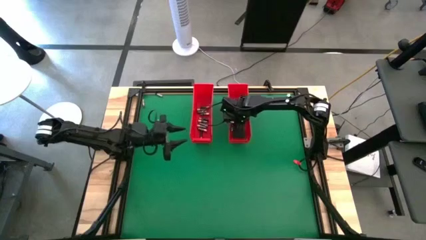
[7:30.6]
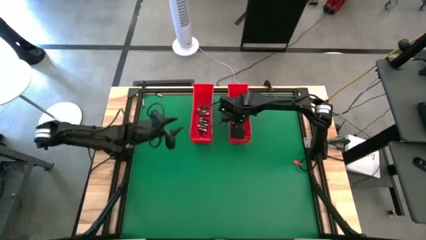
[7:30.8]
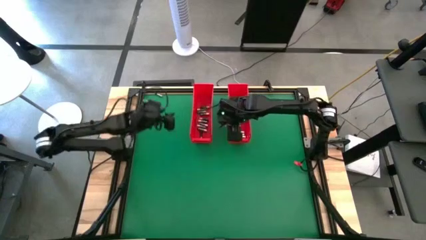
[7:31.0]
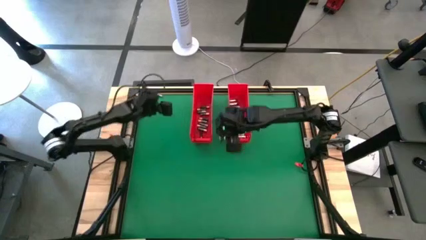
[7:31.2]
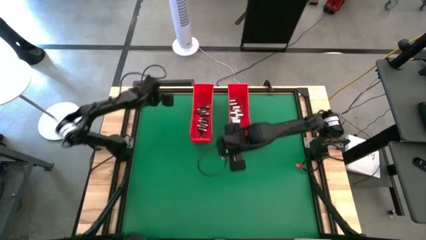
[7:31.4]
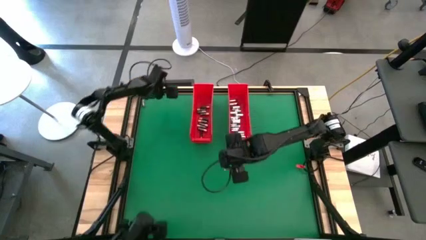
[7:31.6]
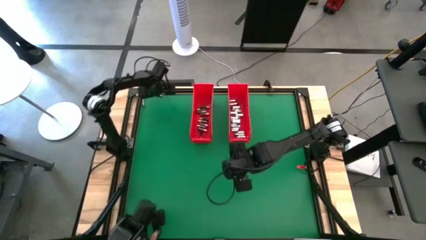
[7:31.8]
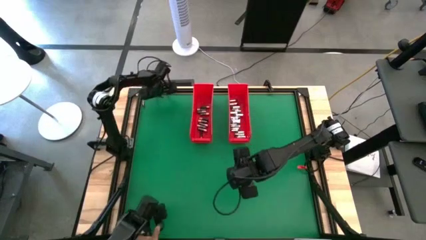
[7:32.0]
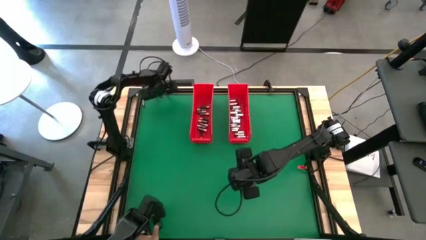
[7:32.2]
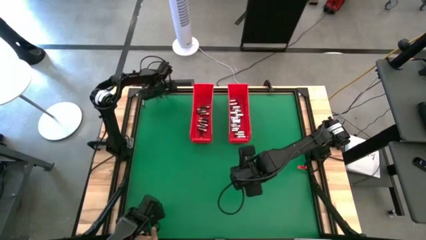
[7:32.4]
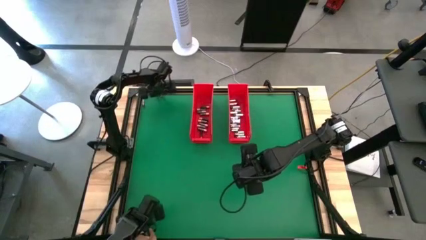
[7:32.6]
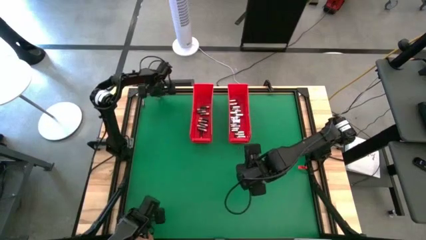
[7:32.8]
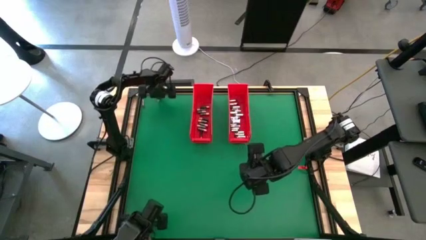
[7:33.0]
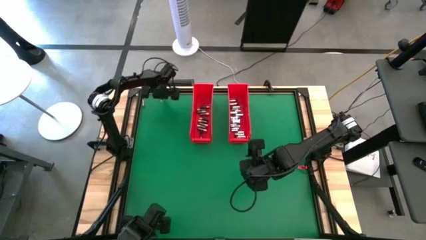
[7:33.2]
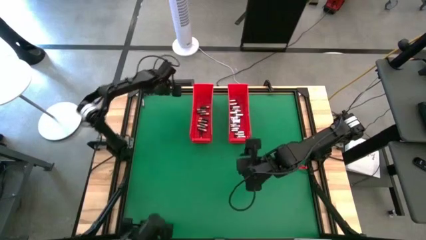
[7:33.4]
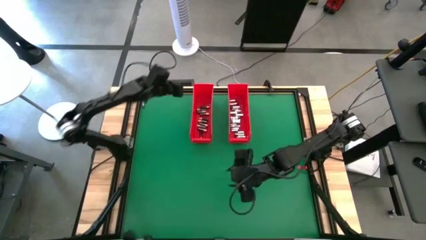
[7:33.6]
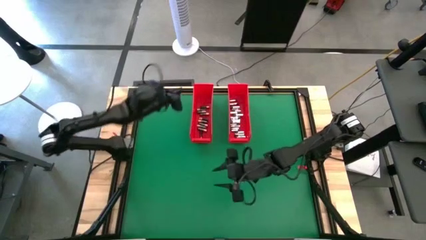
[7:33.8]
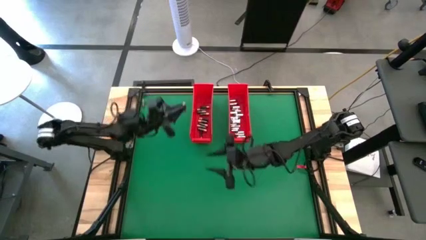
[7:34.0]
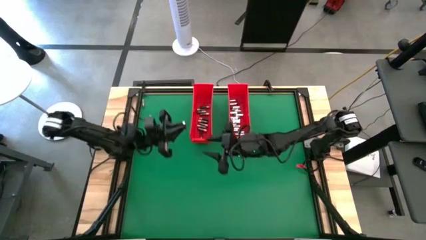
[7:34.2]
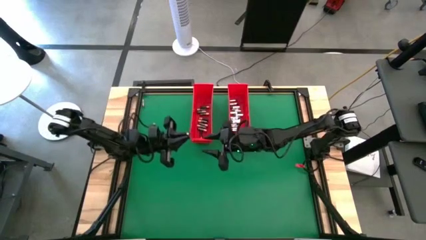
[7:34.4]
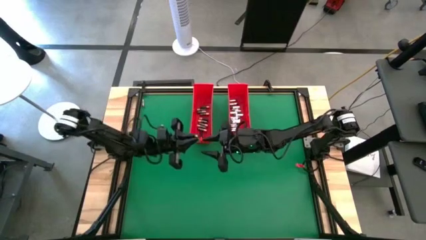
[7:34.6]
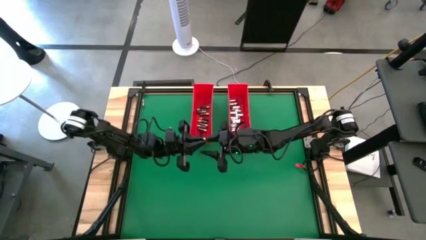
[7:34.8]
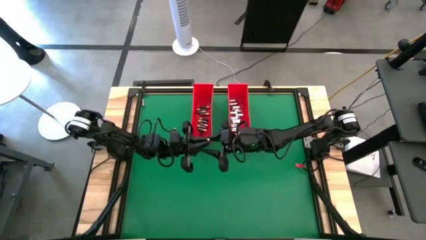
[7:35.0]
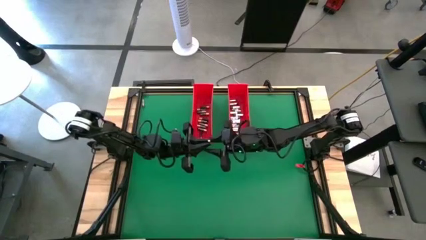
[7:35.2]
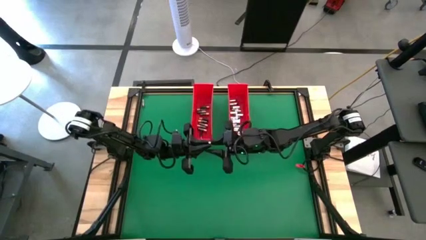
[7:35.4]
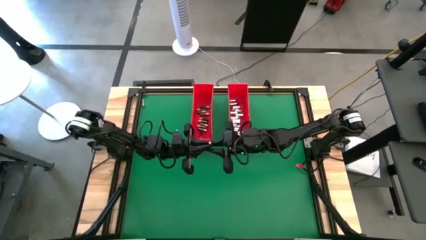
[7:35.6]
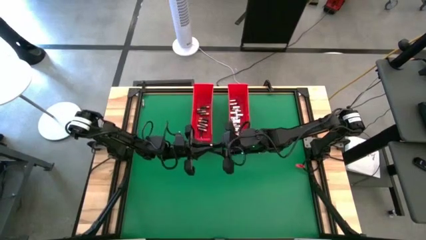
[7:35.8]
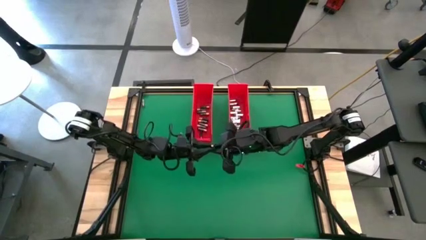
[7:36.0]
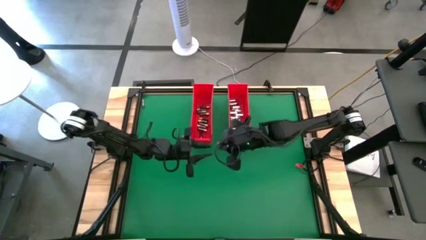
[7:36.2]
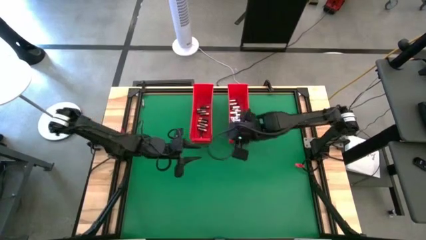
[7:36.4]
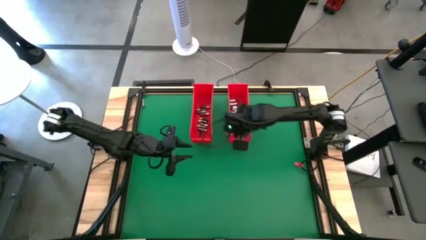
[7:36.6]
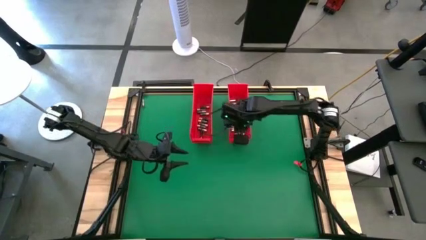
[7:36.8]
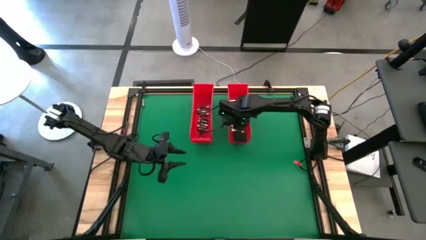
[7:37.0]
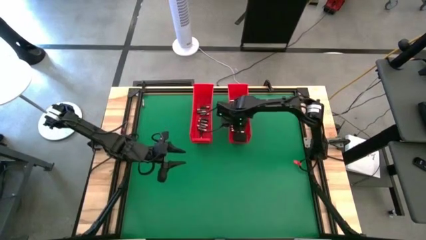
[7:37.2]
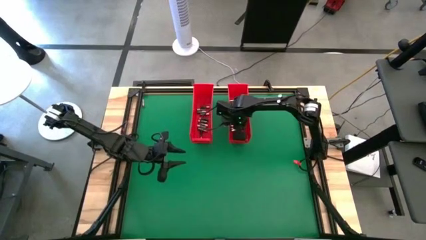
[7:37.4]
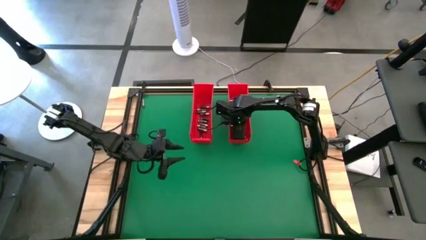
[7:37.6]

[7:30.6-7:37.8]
Task: Sort batteries
Put the silver battery into the right red bin

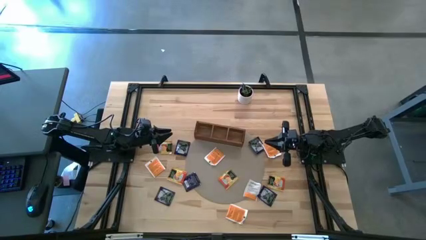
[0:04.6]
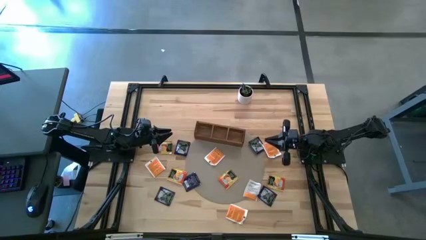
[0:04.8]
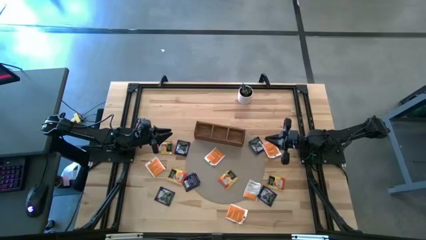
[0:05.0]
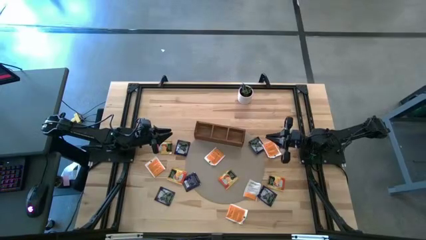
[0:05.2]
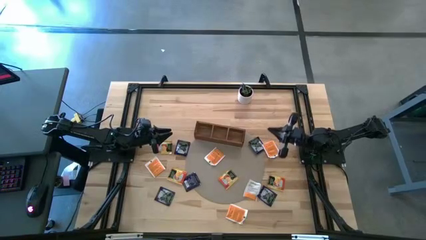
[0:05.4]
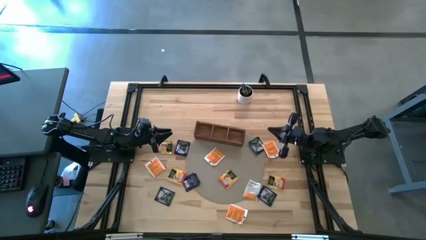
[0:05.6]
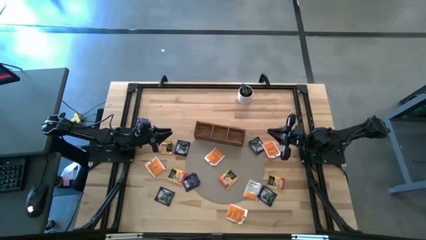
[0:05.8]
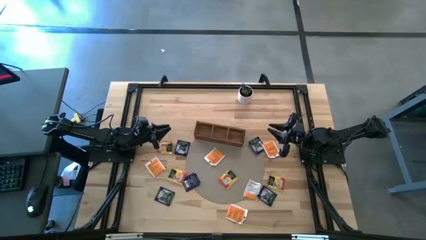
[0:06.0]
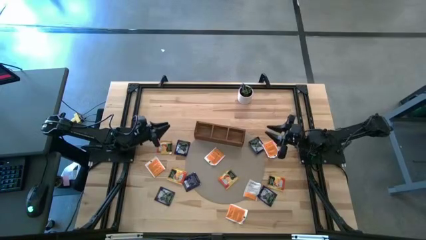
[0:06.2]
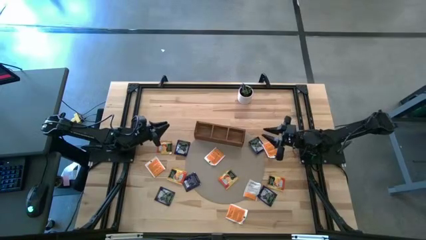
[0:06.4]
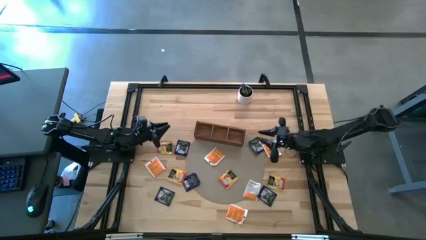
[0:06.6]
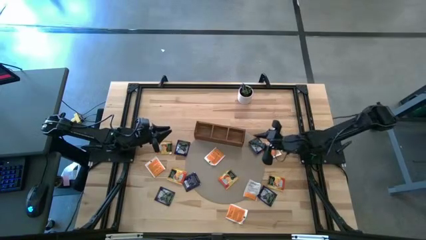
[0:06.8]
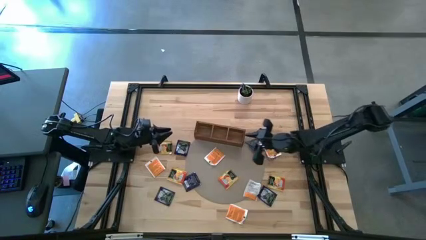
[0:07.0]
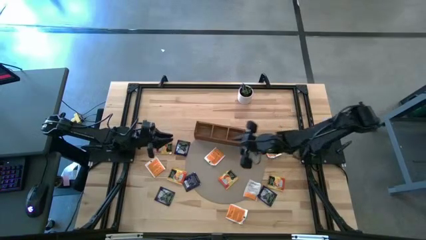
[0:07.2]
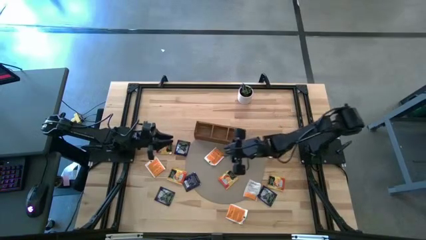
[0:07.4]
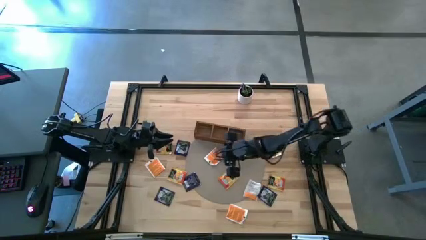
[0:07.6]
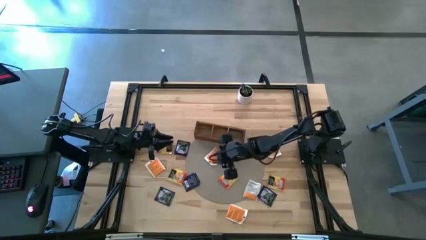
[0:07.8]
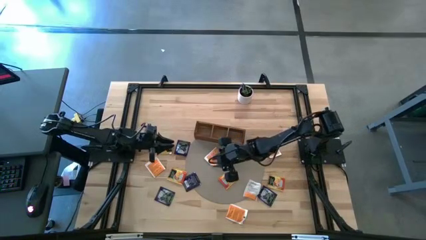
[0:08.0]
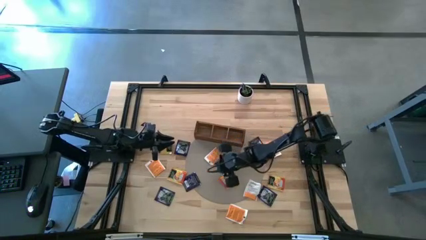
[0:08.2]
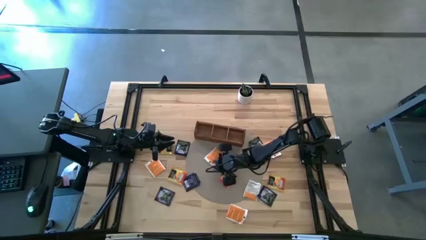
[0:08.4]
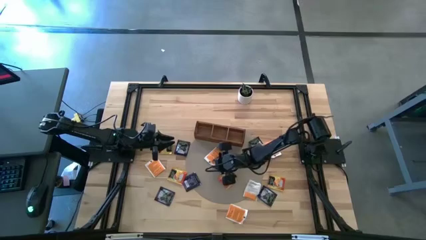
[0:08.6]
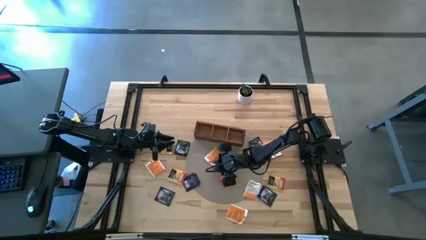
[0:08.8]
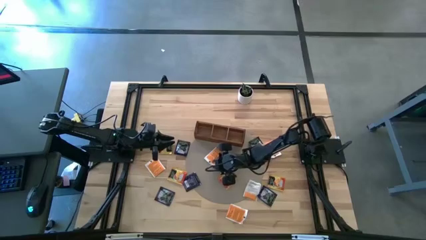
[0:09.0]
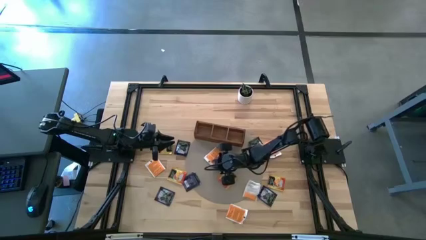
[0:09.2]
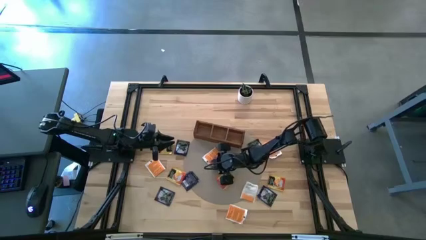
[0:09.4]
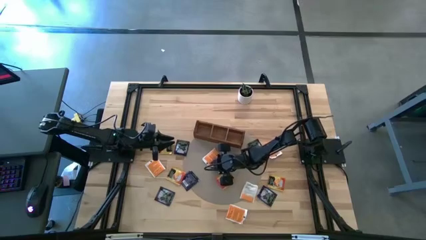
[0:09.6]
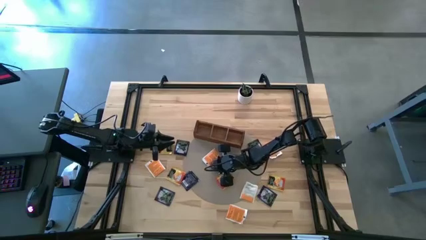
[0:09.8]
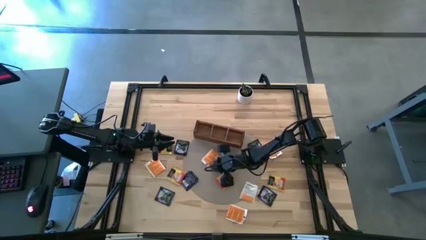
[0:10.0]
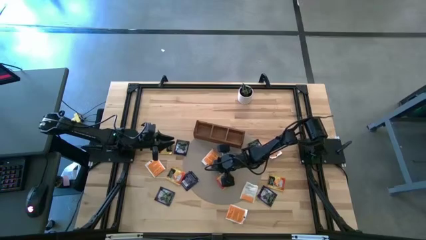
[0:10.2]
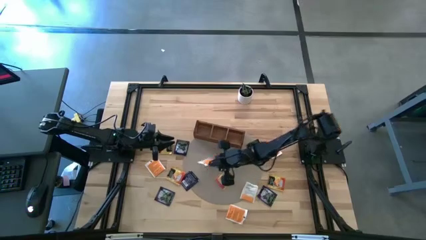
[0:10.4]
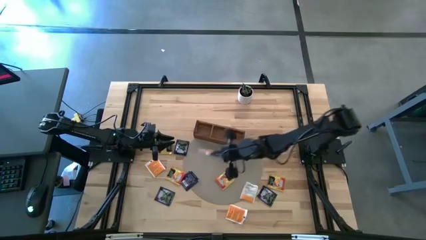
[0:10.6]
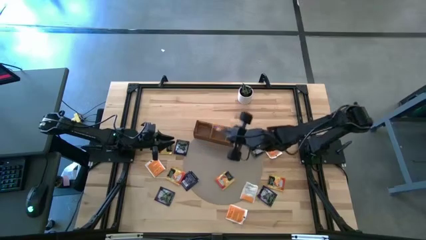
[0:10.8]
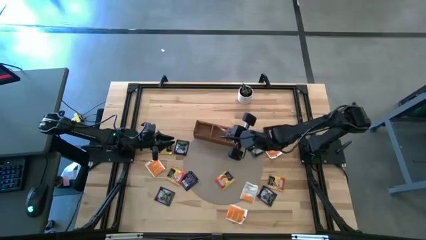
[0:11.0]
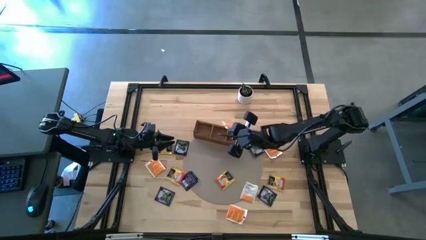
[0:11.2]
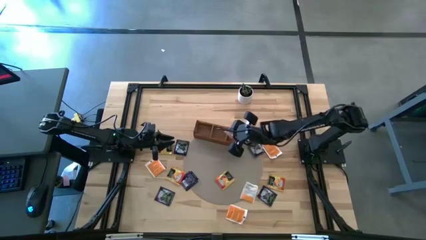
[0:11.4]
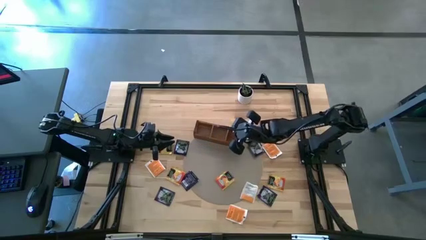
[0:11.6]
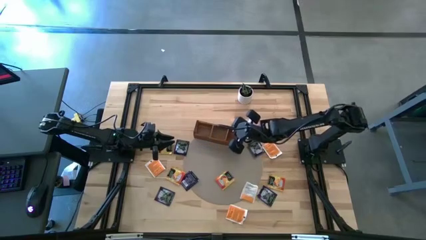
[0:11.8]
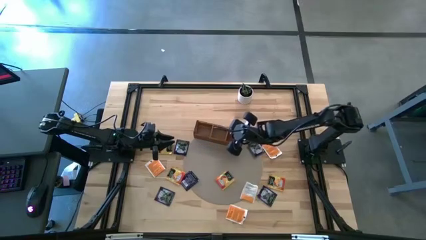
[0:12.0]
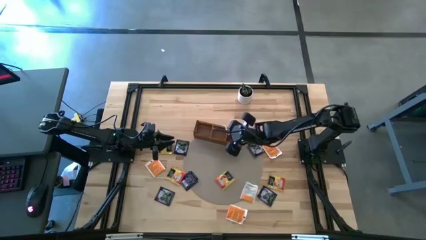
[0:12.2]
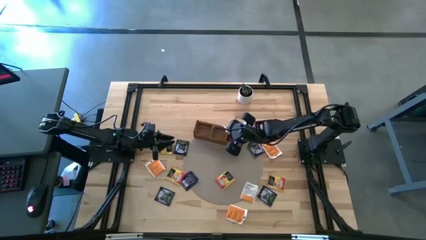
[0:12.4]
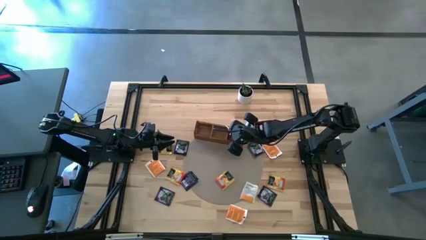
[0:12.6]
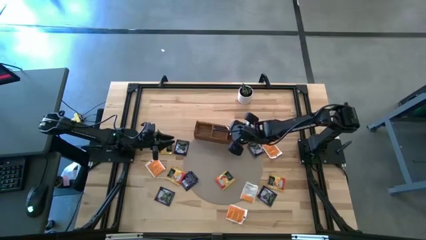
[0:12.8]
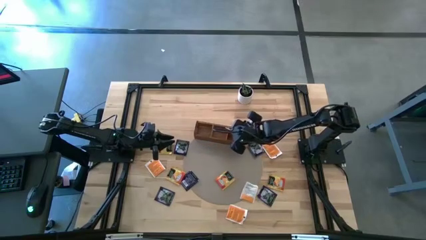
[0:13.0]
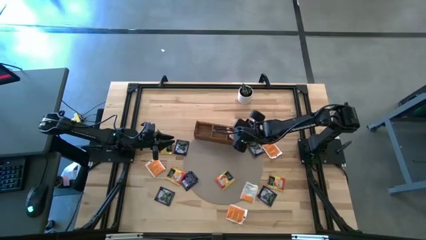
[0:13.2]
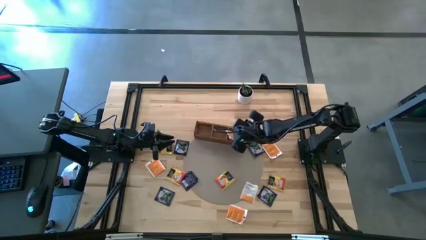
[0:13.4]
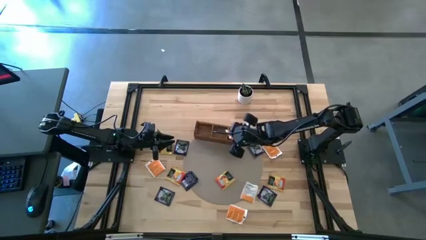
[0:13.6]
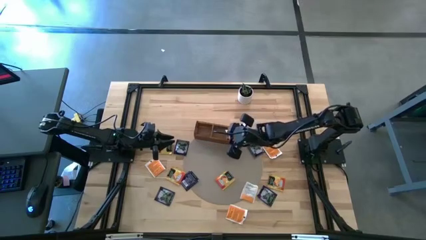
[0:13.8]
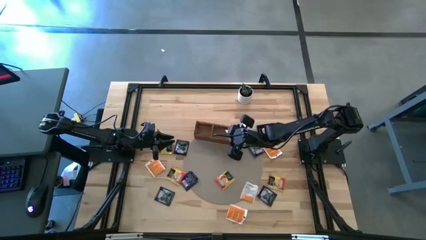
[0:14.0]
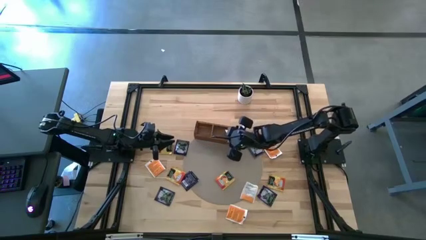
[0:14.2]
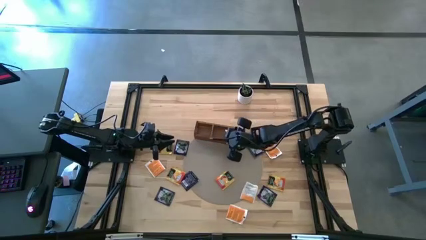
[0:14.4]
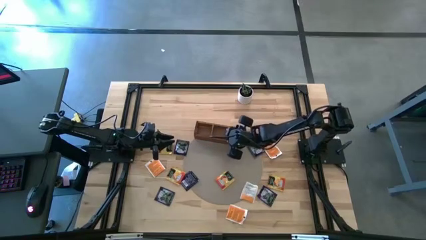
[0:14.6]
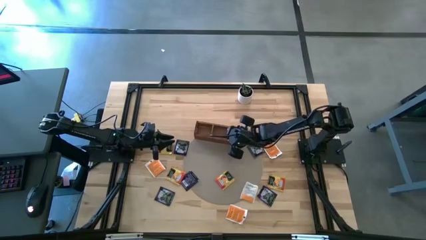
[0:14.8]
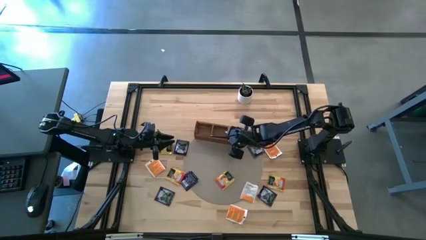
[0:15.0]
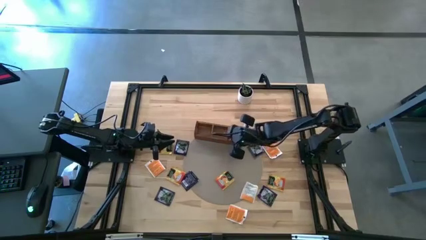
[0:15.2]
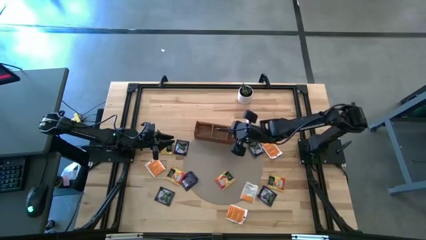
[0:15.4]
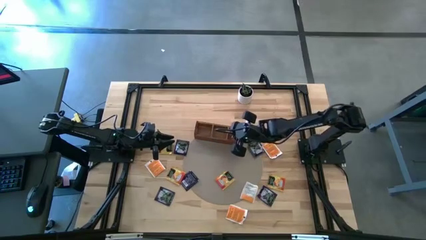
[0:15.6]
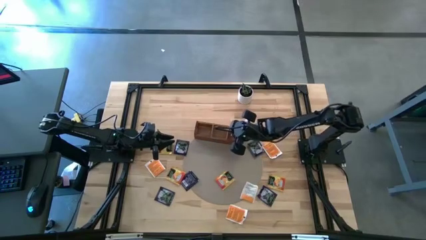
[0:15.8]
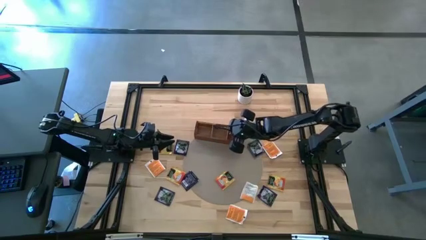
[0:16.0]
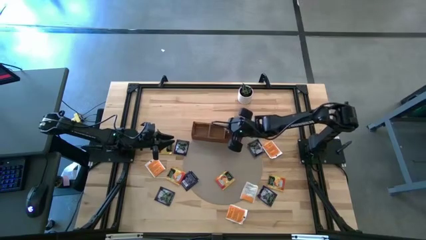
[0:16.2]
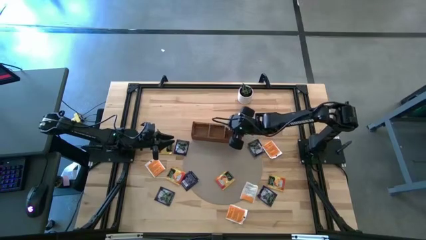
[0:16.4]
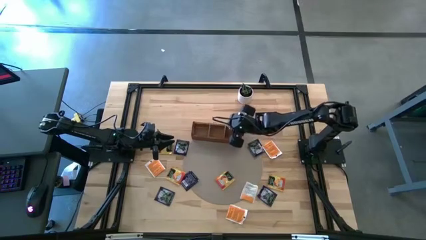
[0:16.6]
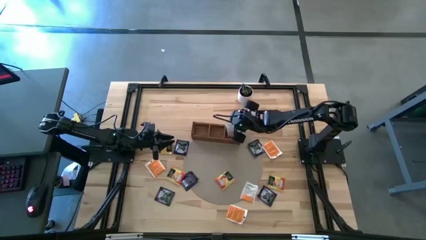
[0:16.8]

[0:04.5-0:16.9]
Task: Pick & Place Tea
Put the white tea bag into the right section of the wooden organizer
